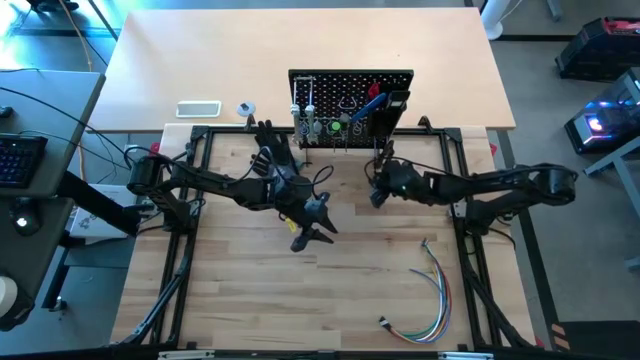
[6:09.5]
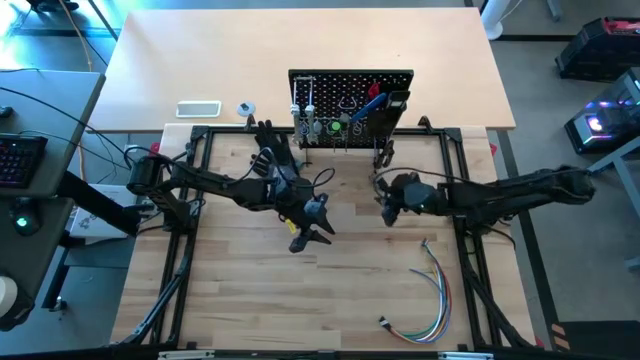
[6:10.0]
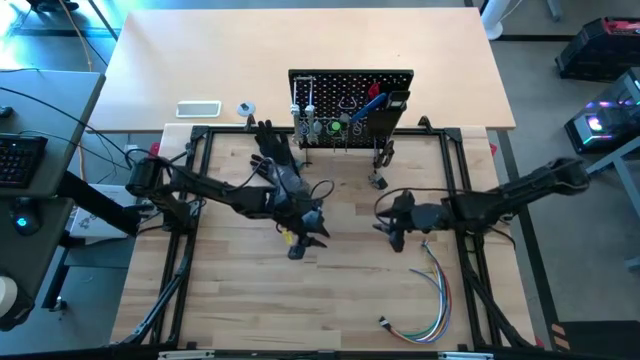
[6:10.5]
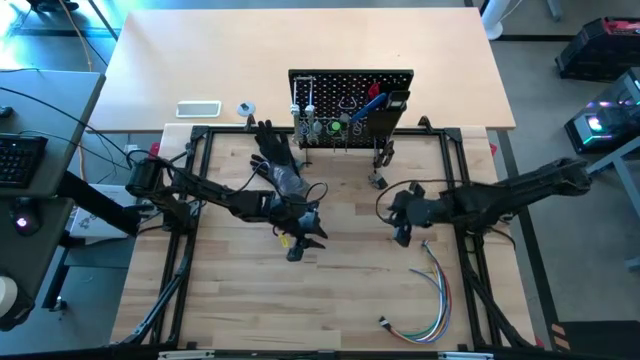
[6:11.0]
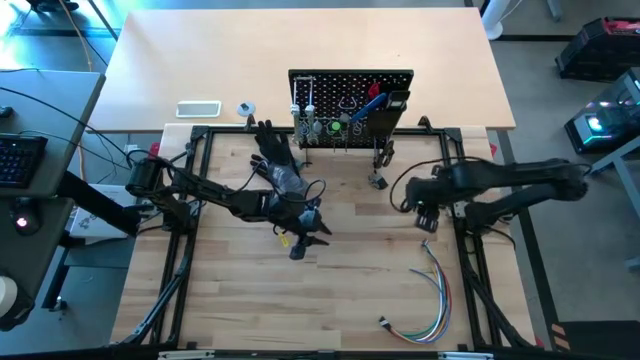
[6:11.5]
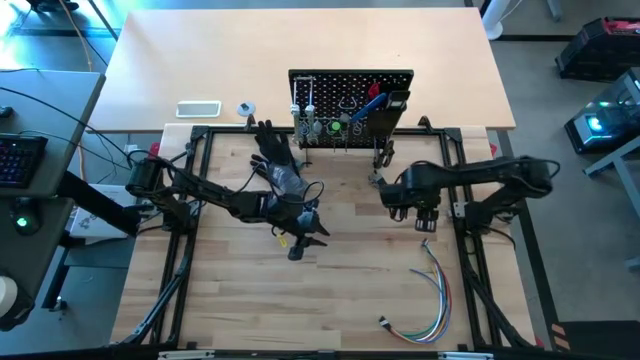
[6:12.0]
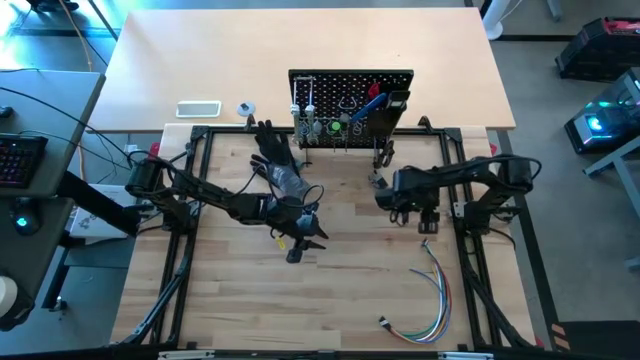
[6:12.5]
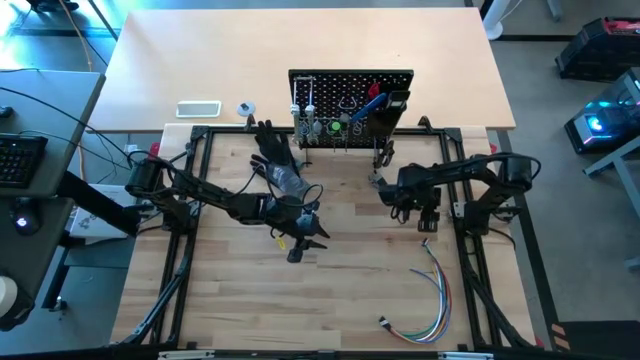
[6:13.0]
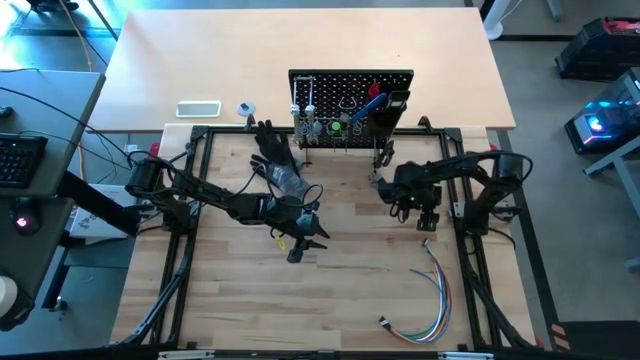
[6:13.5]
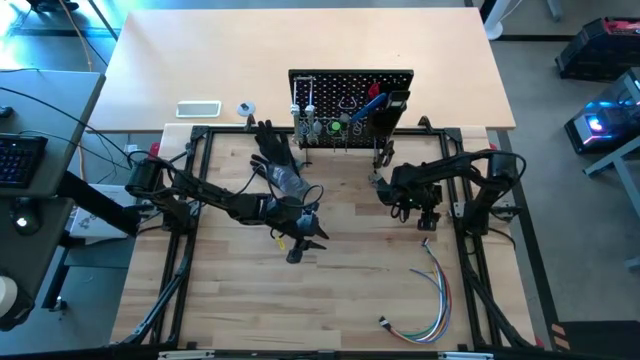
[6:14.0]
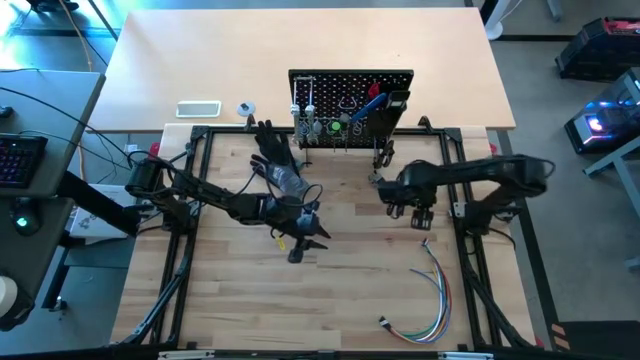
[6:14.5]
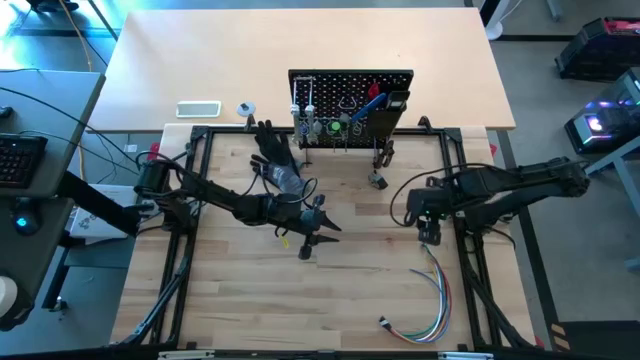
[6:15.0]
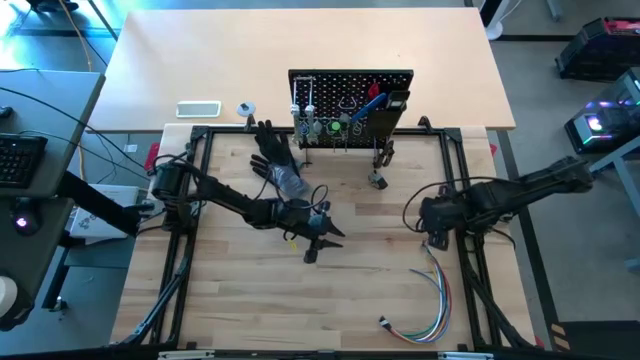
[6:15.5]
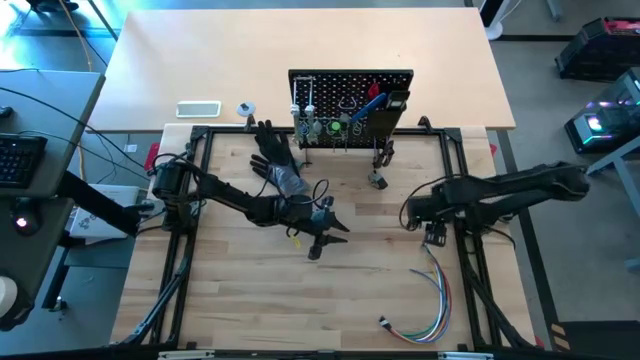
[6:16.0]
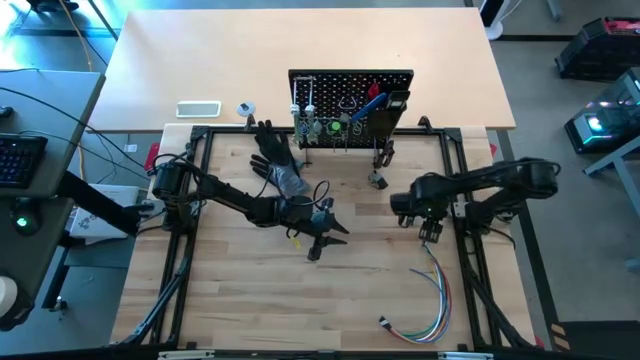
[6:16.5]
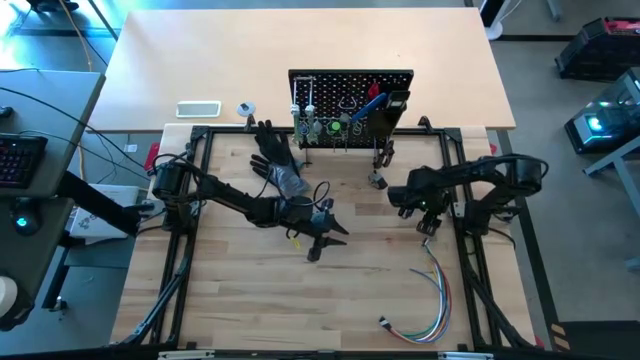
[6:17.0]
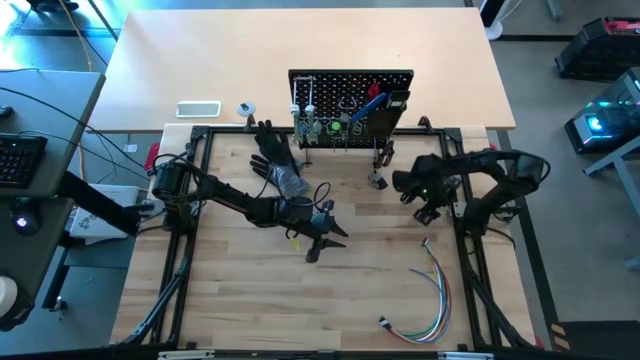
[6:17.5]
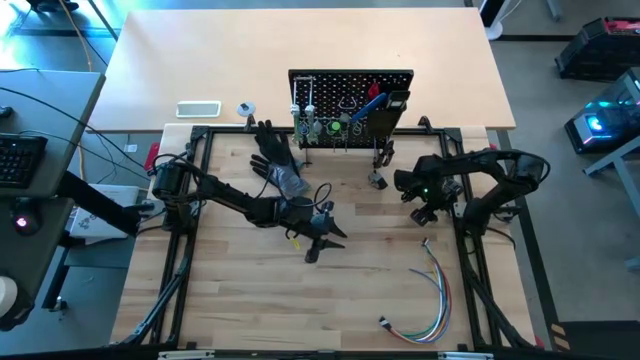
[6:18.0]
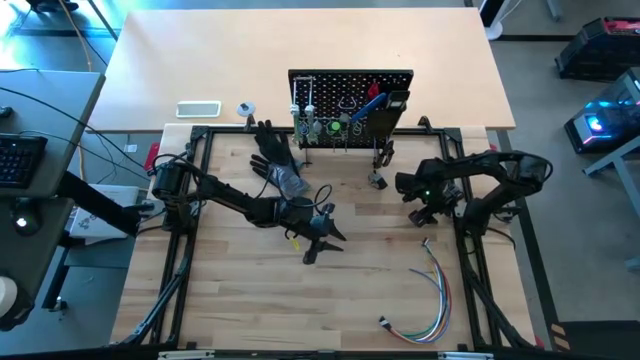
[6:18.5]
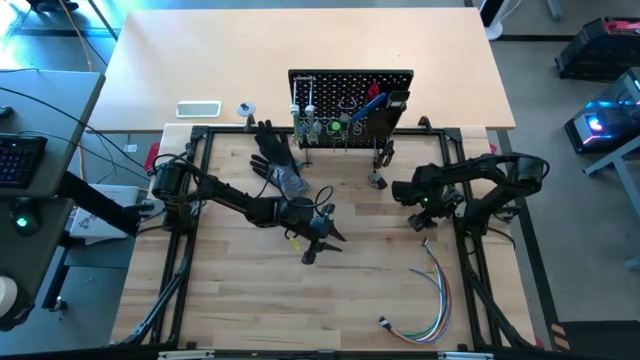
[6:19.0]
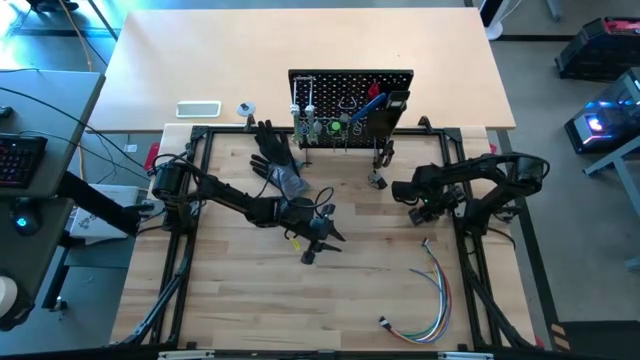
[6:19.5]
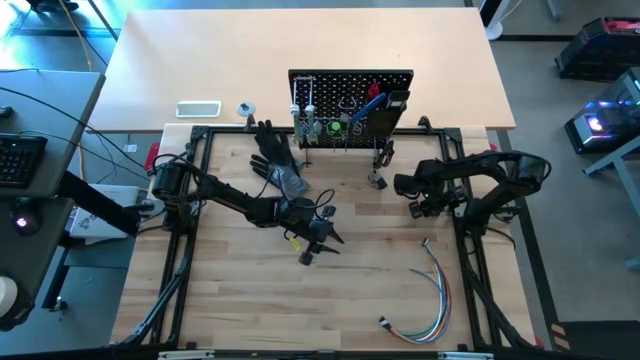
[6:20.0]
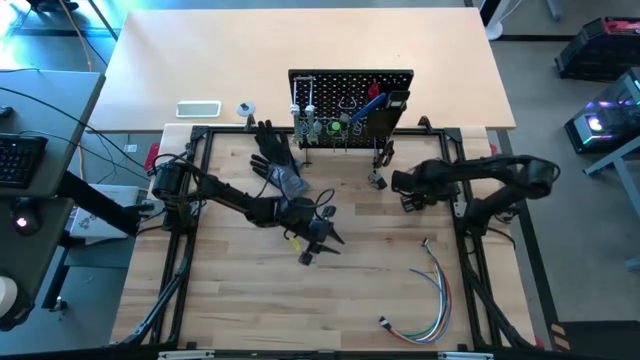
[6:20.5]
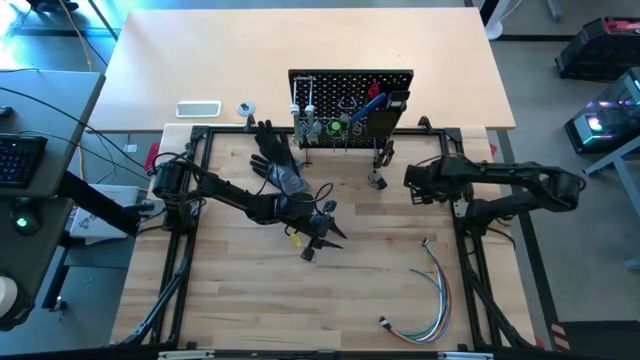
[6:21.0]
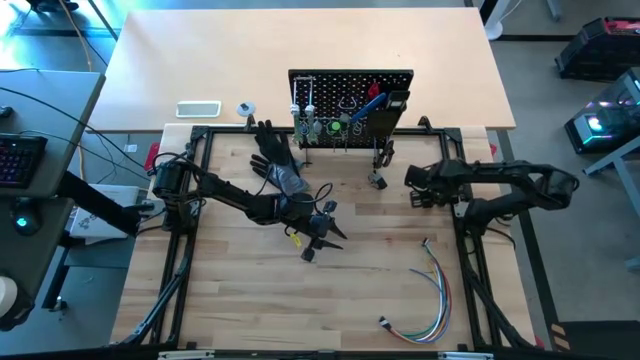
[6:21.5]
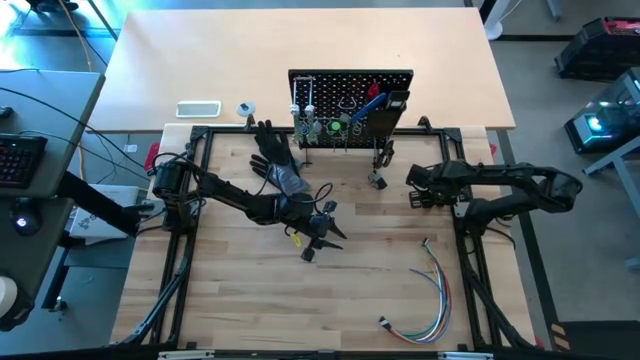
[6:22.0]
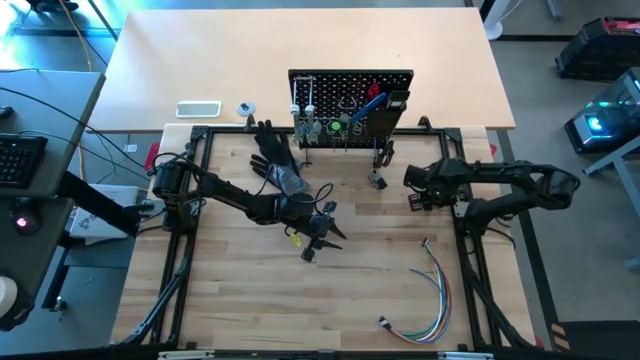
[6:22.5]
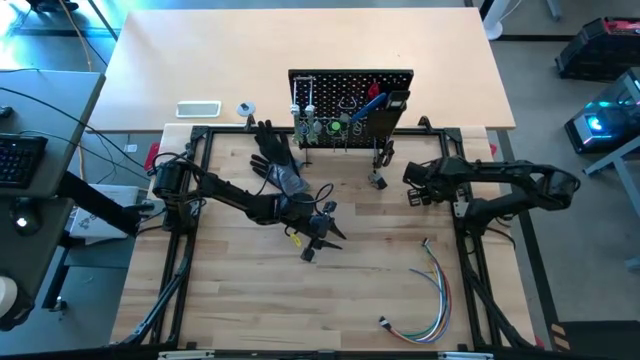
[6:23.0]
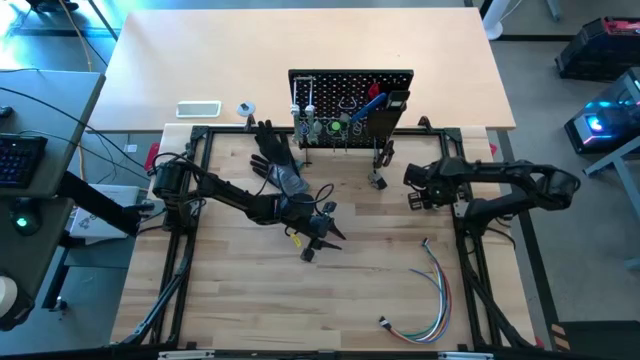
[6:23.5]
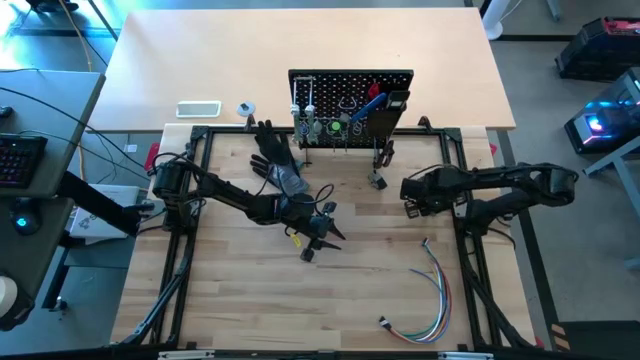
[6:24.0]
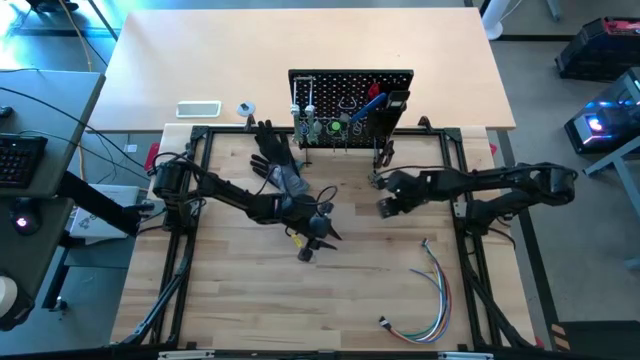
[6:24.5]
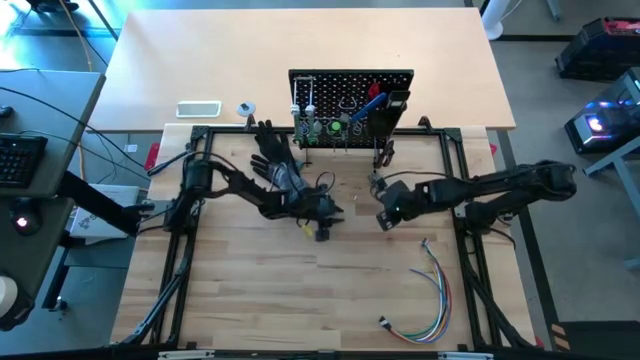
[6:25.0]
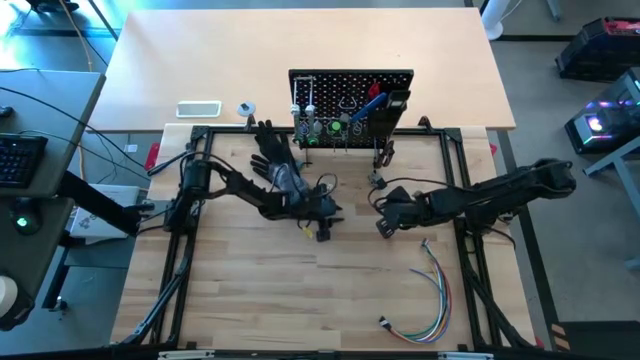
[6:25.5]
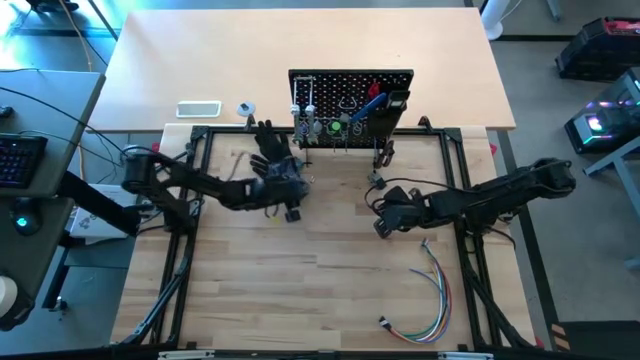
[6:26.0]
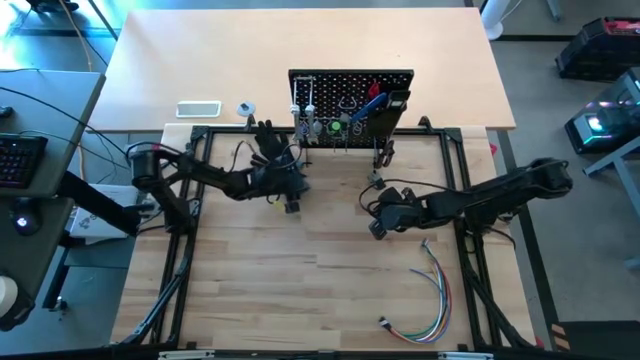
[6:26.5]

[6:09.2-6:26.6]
Task: Hang tools onto peg board
Put the silver socket into the black bin on the pegboard
